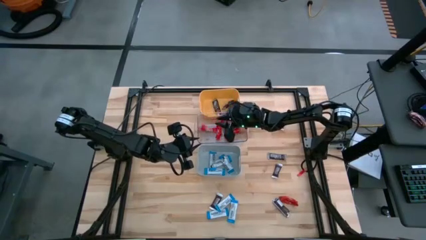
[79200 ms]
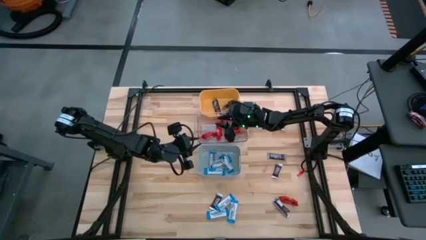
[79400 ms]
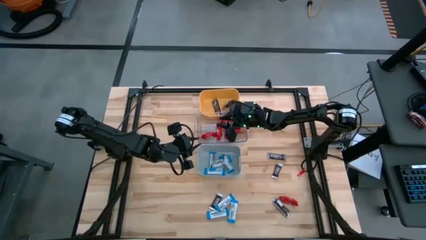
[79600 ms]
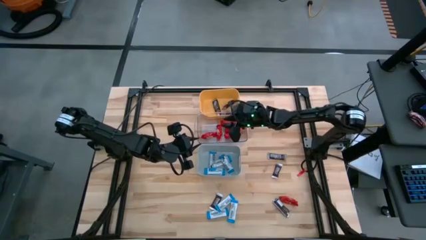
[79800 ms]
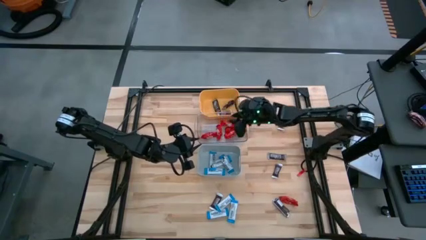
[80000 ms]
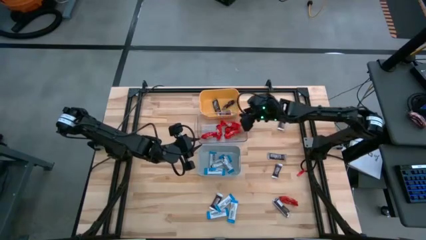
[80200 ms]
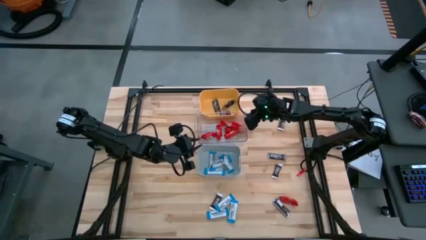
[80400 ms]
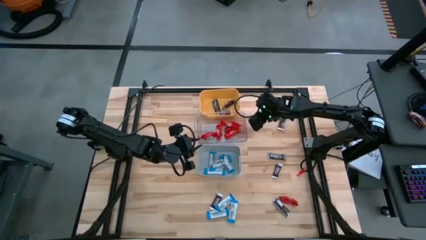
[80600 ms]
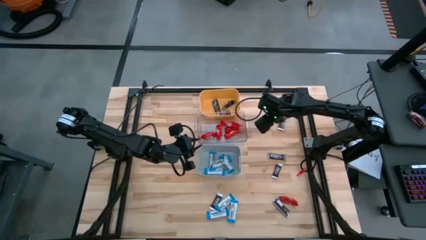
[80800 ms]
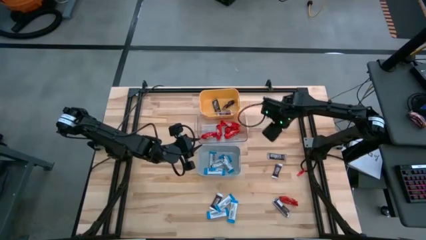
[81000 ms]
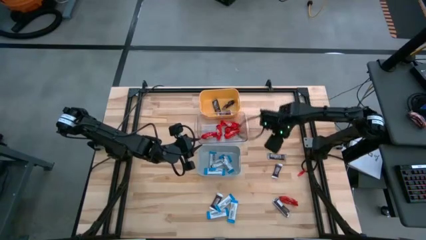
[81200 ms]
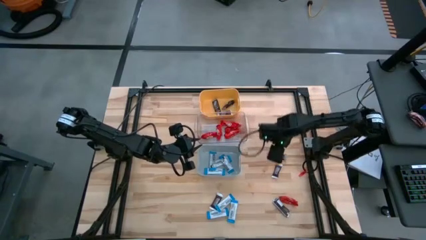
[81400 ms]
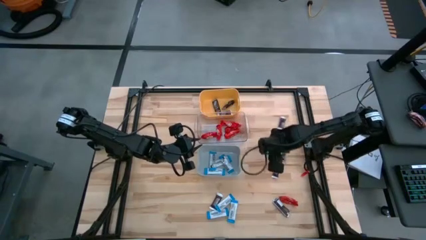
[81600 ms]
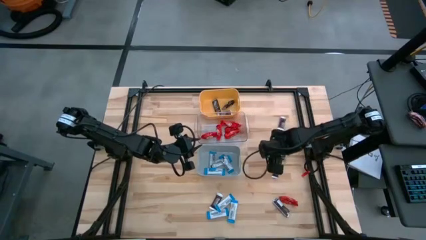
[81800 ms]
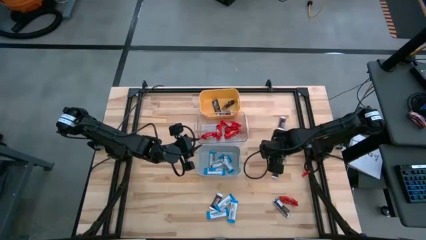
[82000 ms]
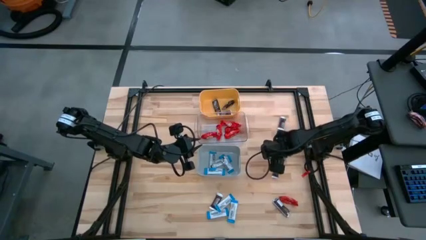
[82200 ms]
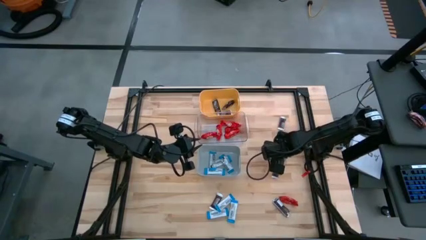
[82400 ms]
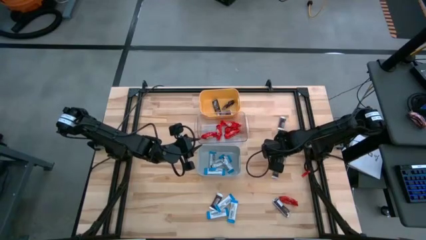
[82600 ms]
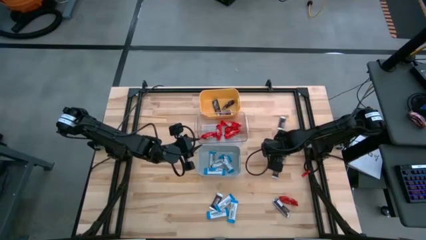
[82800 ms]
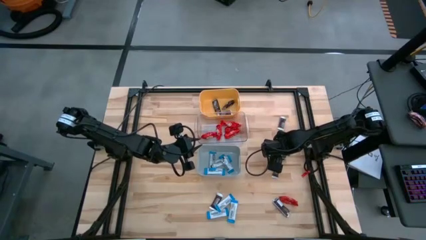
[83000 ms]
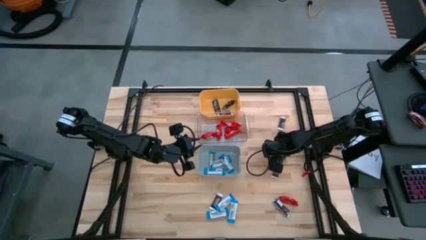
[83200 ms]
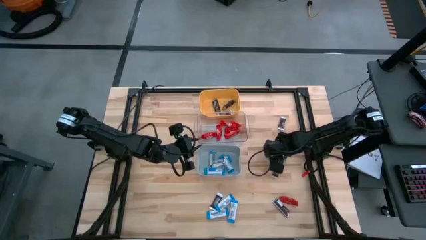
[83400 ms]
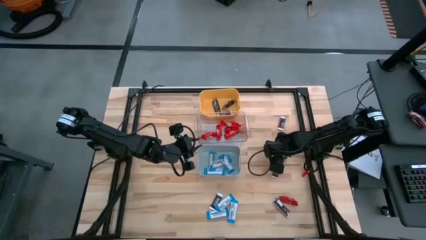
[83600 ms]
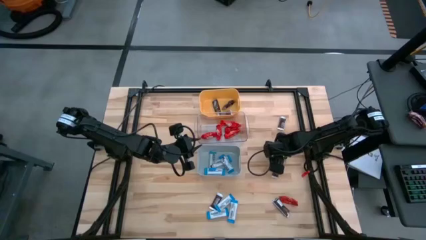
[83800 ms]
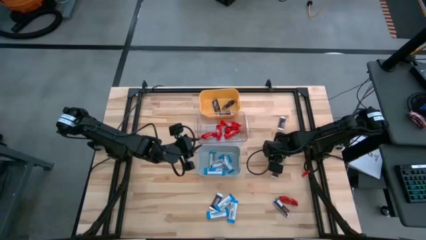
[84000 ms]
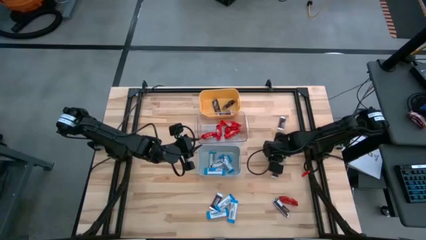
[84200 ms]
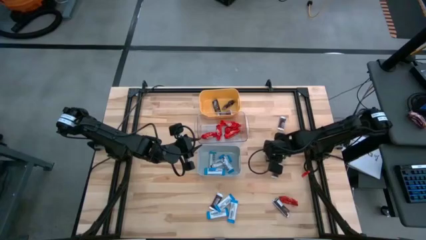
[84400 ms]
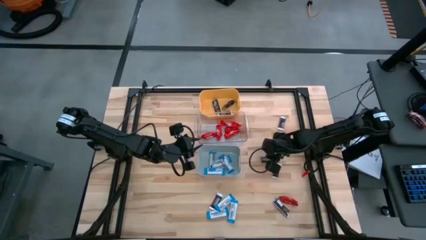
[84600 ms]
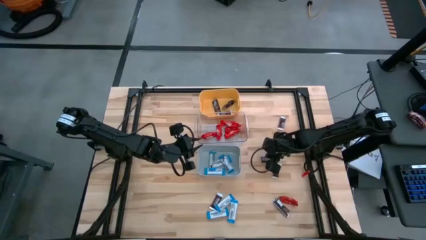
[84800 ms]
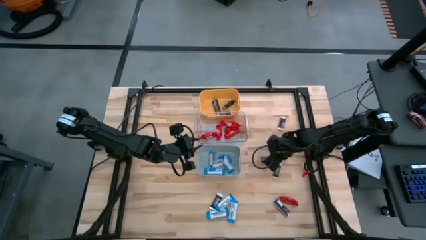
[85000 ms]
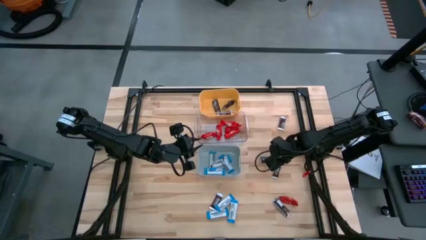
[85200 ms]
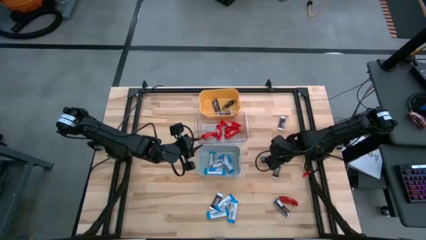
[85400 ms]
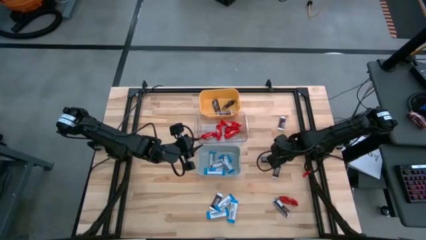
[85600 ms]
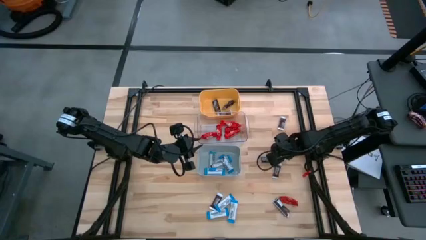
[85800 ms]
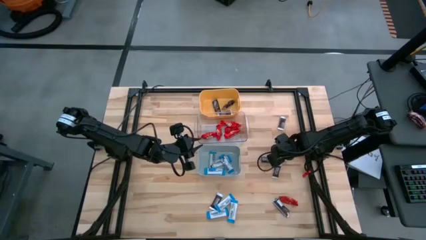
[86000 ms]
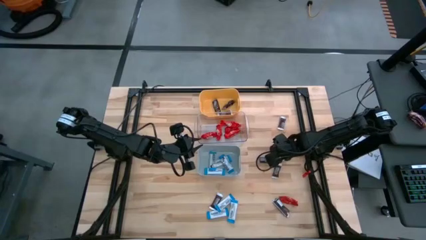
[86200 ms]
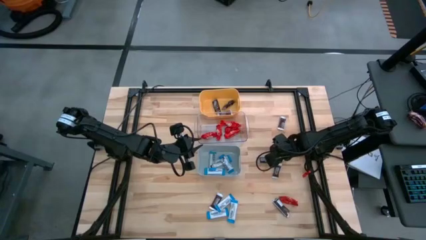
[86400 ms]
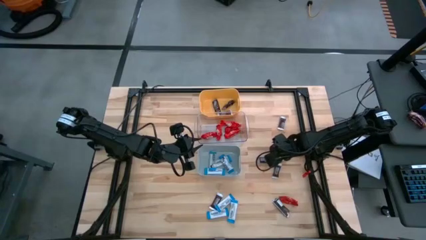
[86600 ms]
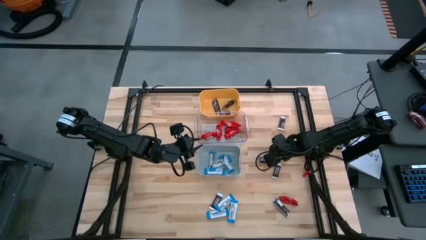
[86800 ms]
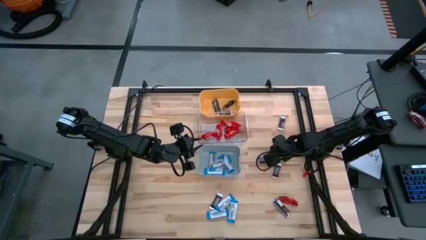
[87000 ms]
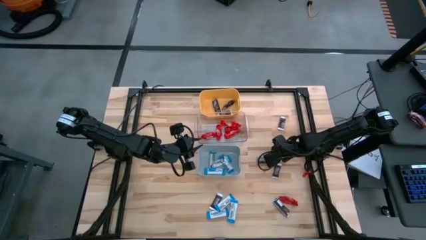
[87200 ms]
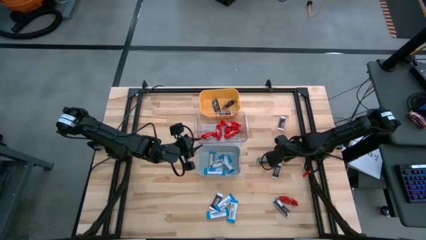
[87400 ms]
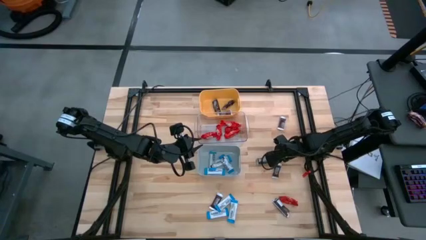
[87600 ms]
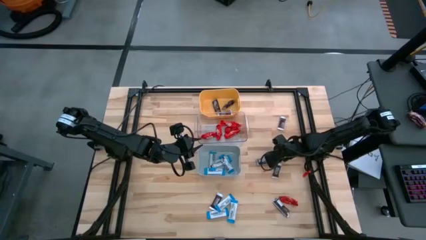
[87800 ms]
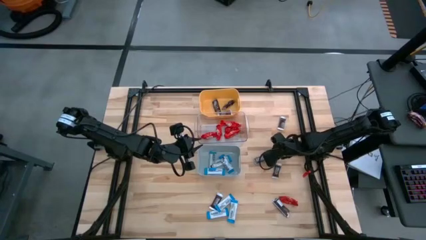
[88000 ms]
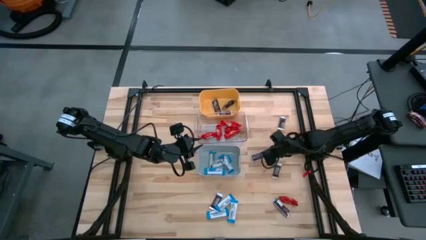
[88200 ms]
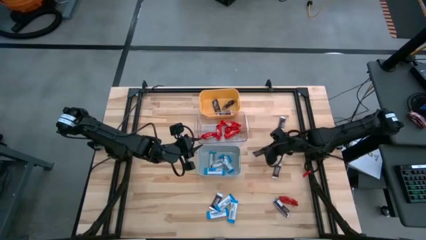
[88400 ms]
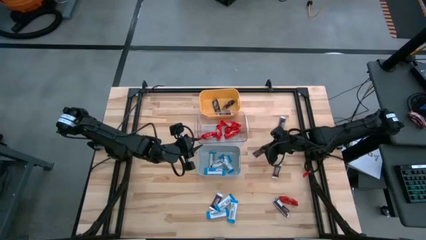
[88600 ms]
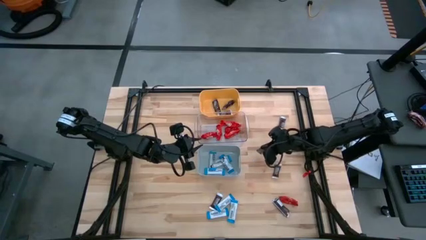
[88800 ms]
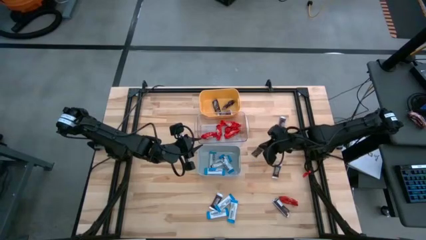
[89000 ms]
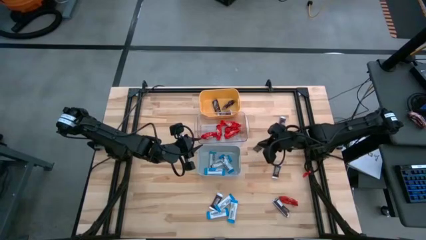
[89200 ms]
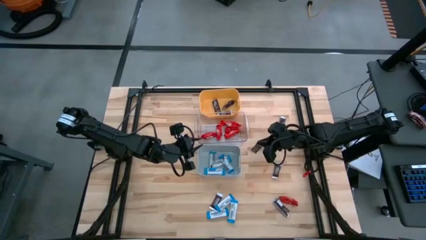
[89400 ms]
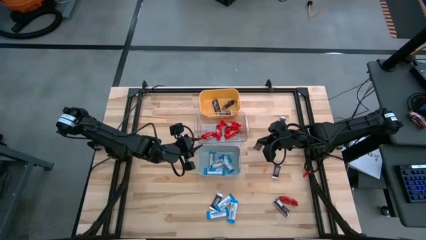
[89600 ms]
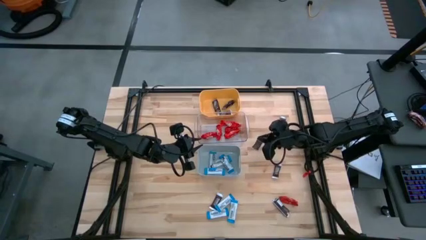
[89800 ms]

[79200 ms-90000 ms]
Task: Organize candy in baskets
Put the brown chocolate bar into the yellow bin

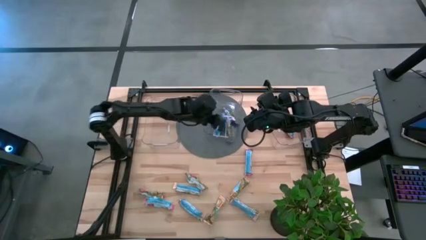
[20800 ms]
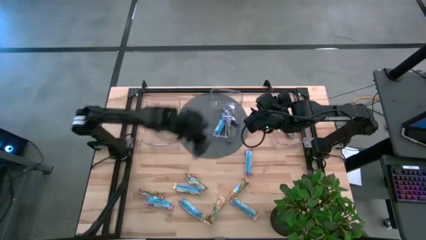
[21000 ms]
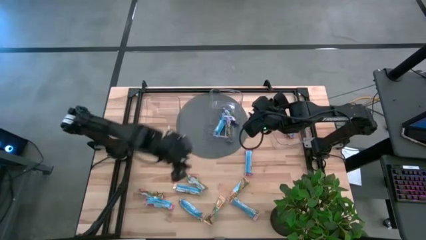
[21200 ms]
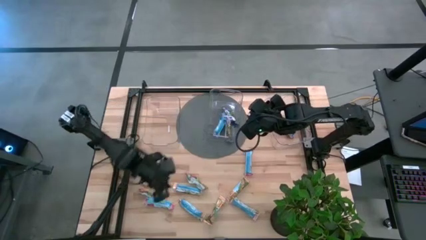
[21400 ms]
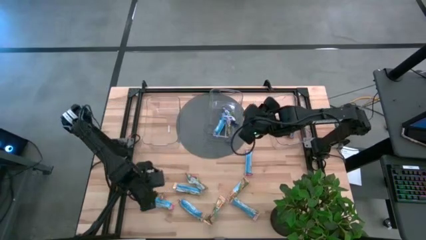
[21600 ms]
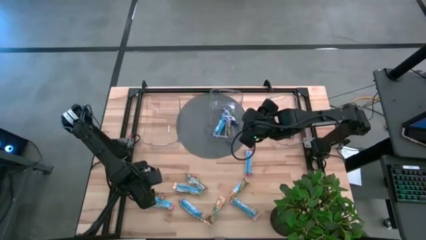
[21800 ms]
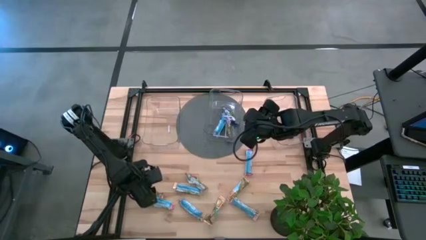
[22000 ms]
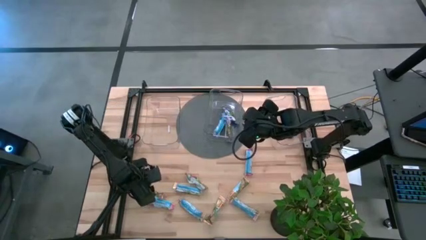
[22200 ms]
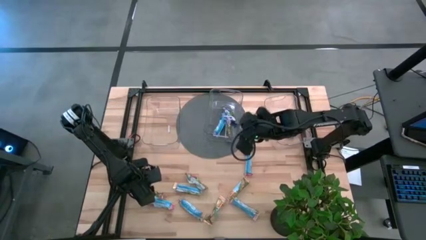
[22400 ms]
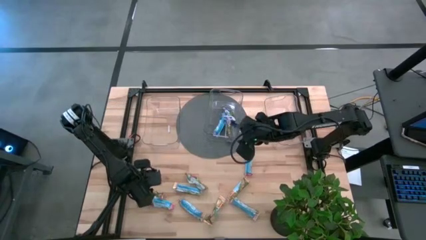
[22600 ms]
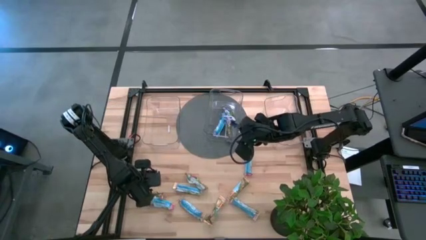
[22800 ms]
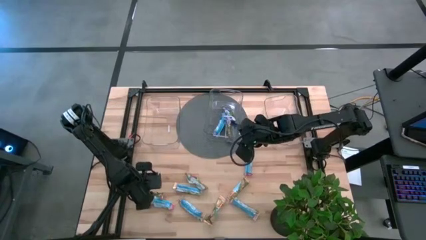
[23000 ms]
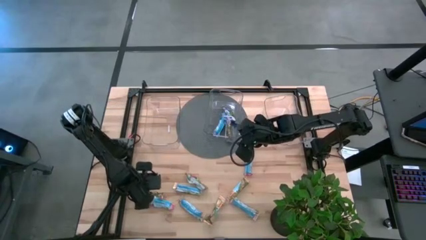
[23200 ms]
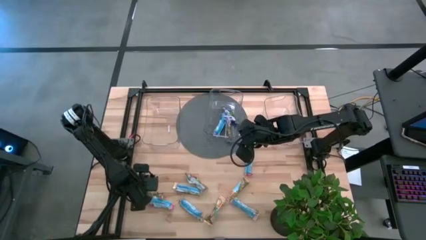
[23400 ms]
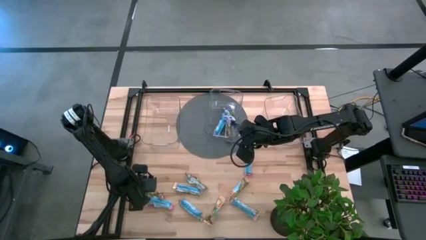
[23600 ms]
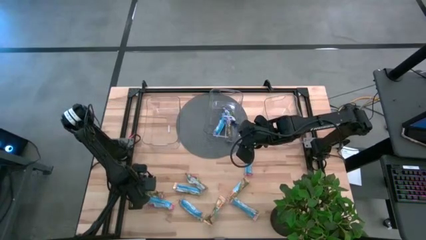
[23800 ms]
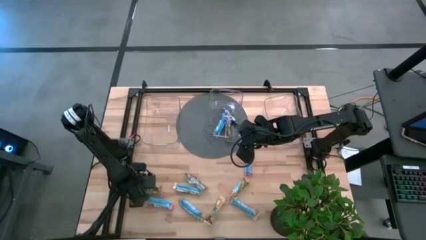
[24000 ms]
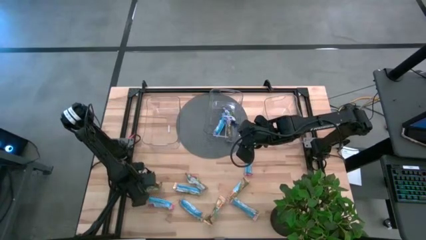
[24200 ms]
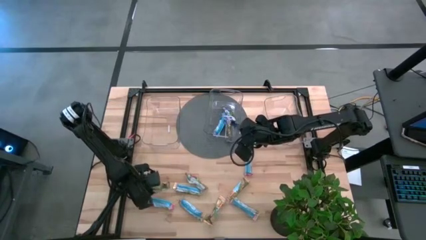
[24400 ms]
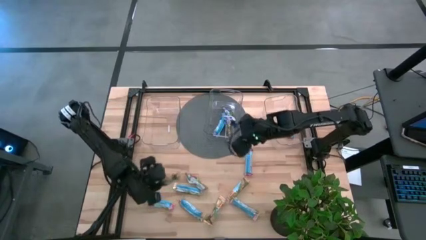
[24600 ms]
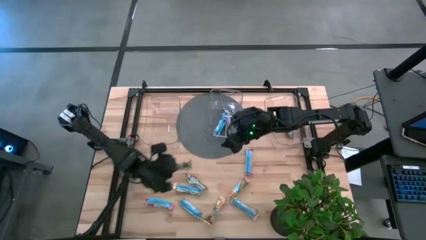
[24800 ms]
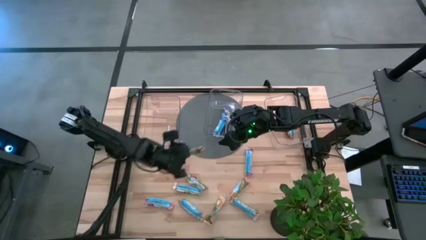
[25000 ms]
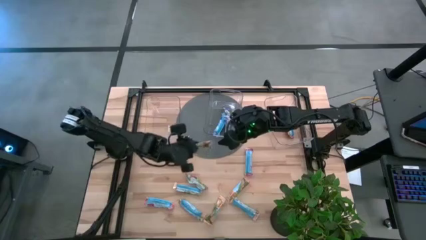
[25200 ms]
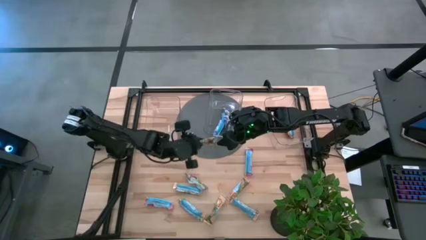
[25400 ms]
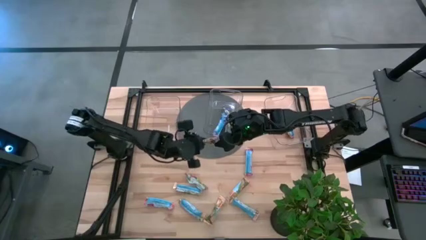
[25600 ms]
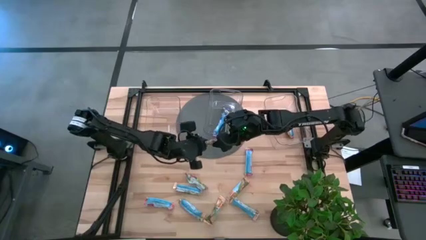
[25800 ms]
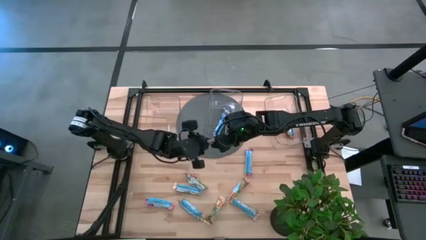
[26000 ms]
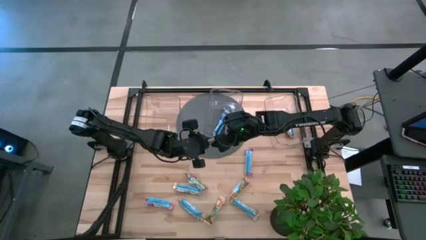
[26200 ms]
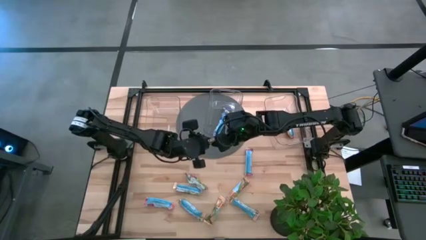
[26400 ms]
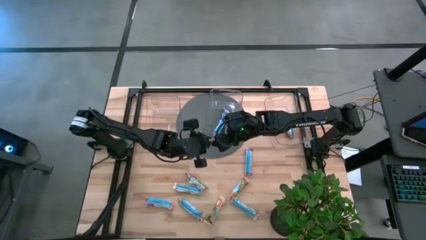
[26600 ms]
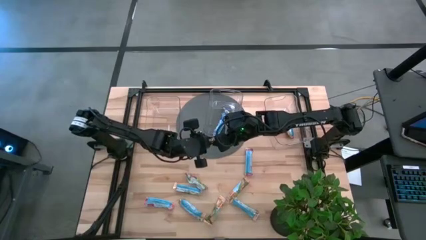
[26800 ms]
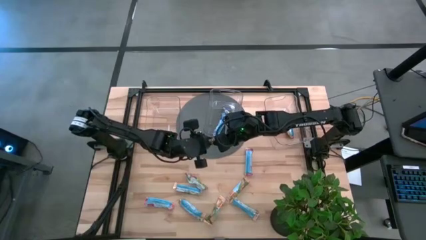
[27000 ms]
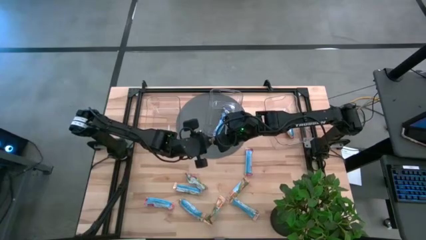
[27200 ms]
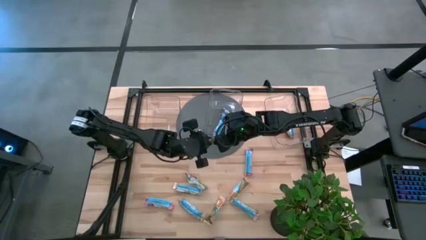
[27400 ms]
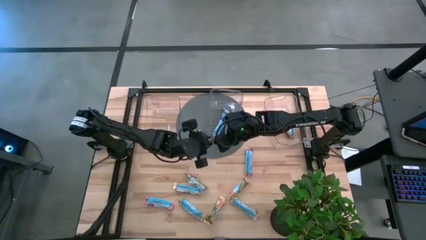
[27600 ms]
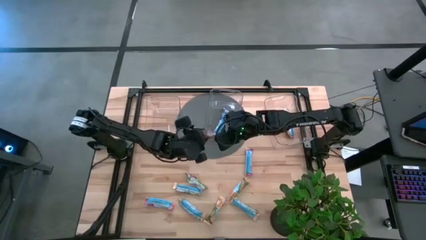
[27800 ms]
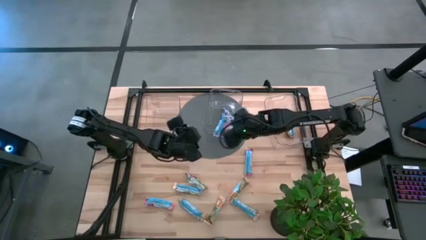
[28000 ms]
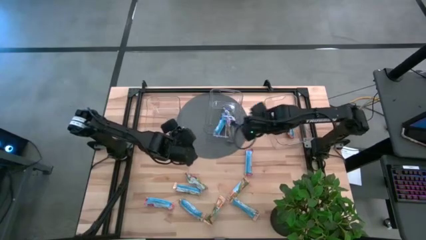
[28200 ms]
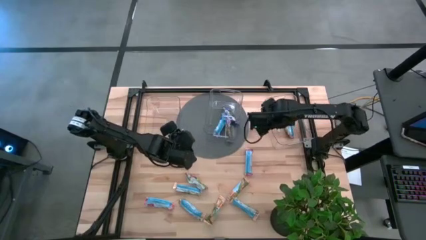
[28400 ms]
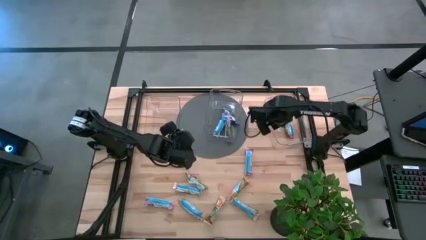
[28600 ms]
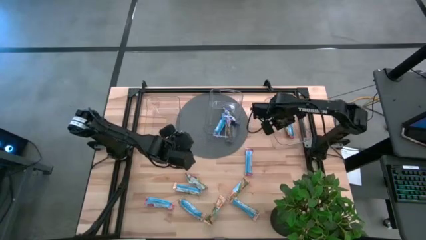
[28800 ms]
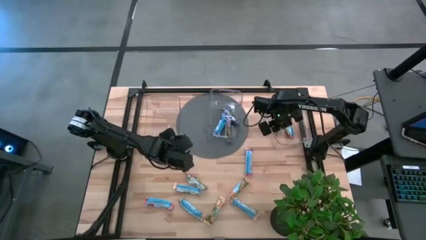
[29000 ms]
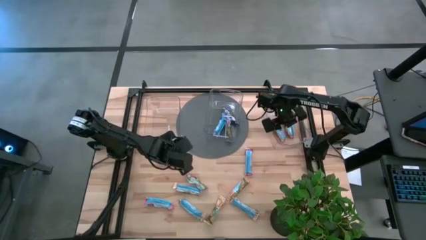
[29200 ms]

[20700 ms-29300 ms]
Task: Pick and place Granola Bars by type
Put the red granola bar into the right transparent bin
